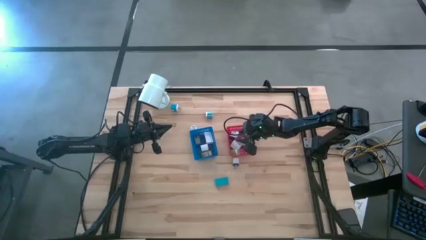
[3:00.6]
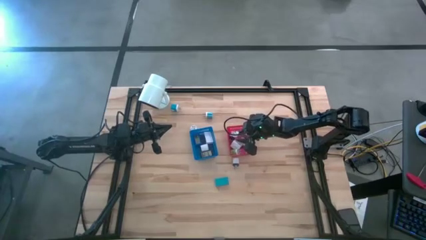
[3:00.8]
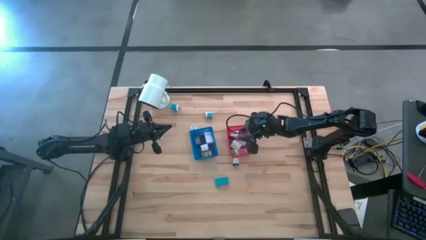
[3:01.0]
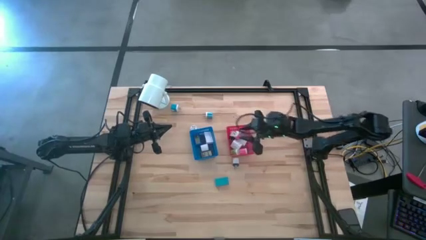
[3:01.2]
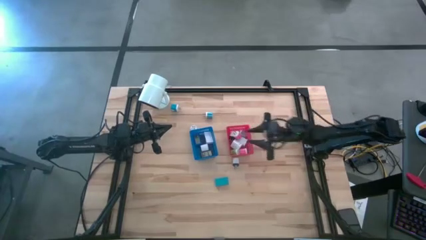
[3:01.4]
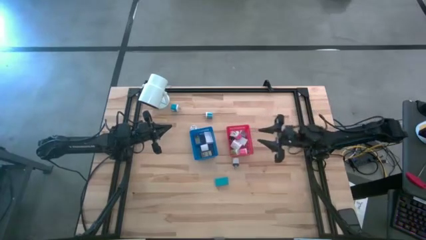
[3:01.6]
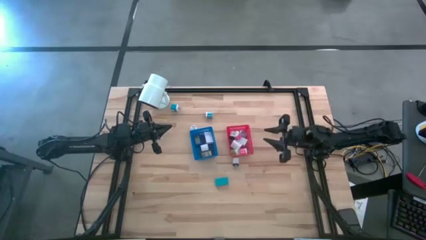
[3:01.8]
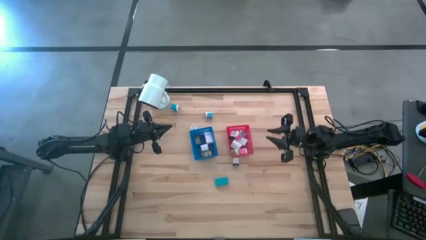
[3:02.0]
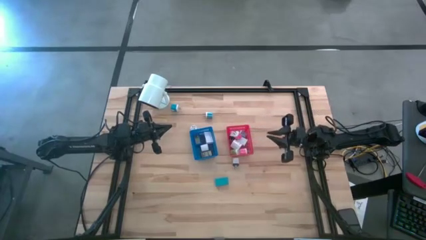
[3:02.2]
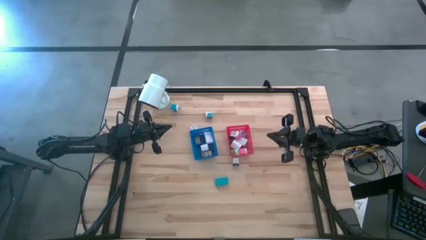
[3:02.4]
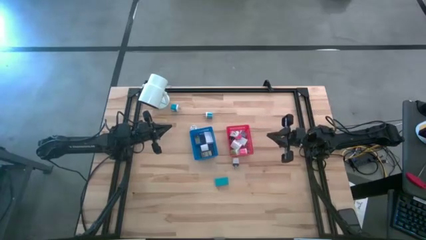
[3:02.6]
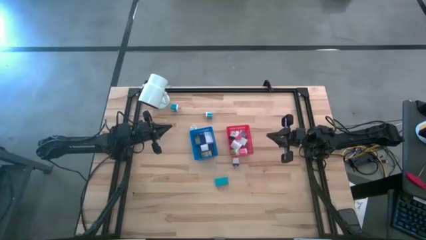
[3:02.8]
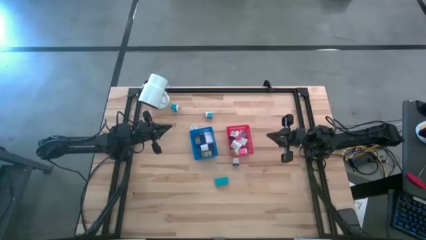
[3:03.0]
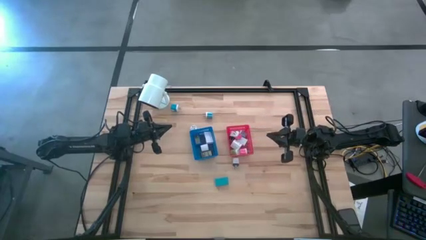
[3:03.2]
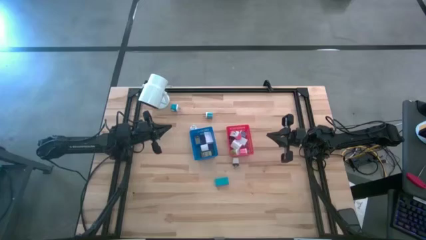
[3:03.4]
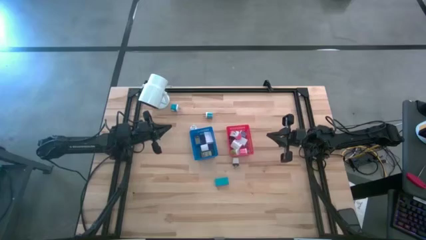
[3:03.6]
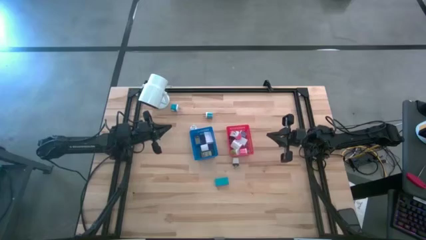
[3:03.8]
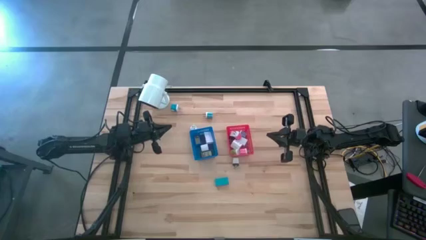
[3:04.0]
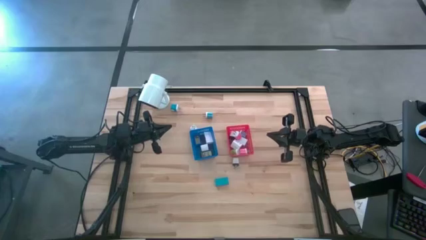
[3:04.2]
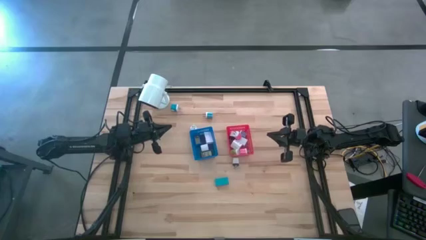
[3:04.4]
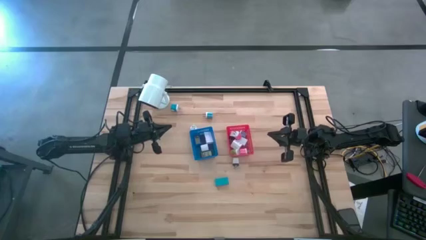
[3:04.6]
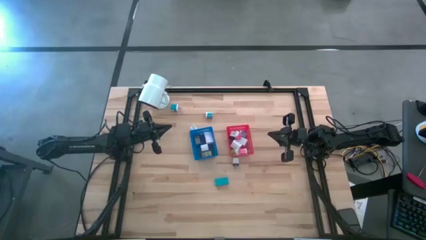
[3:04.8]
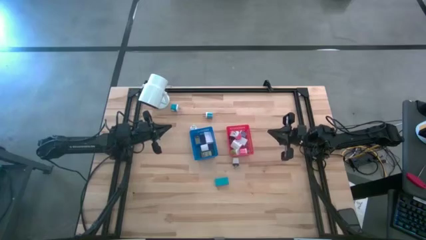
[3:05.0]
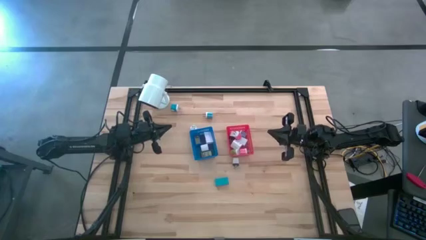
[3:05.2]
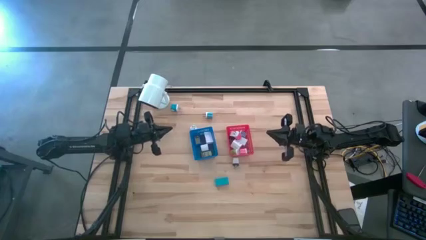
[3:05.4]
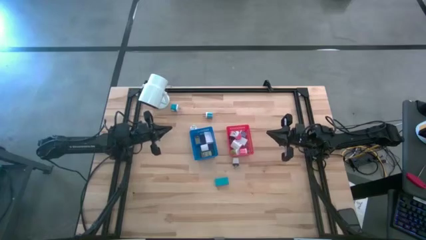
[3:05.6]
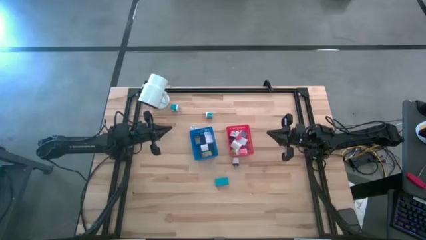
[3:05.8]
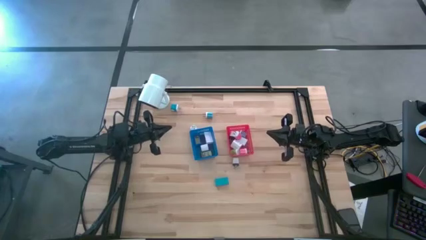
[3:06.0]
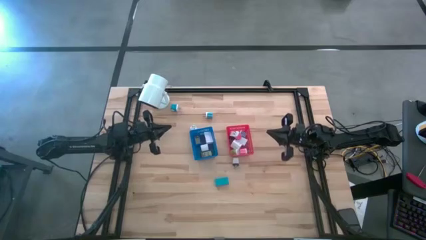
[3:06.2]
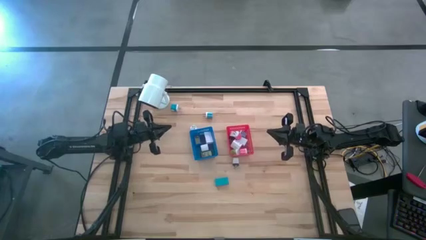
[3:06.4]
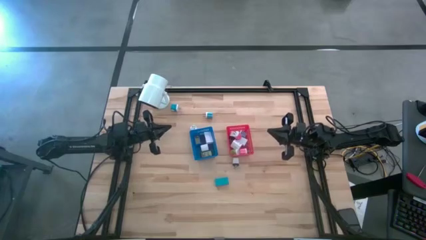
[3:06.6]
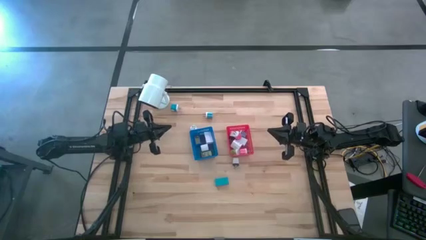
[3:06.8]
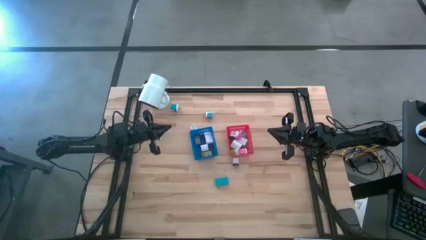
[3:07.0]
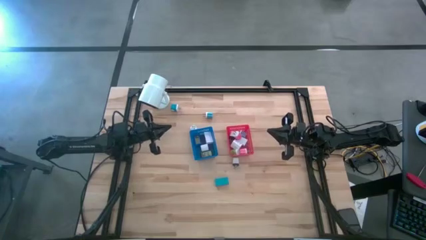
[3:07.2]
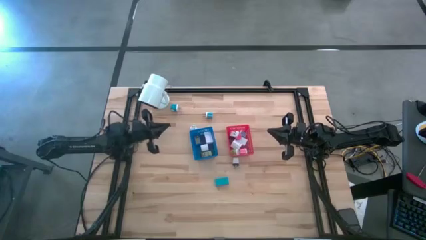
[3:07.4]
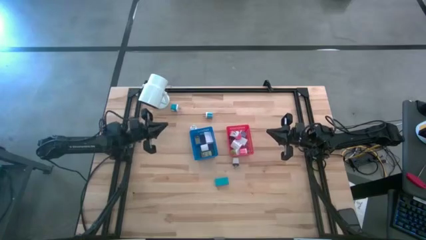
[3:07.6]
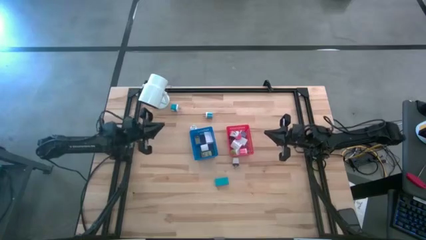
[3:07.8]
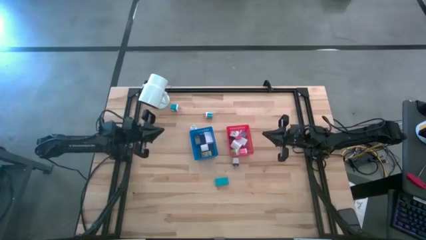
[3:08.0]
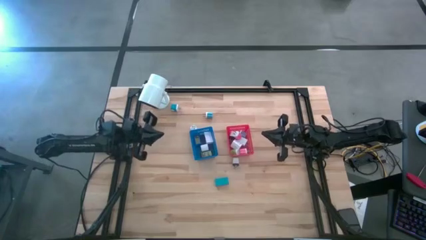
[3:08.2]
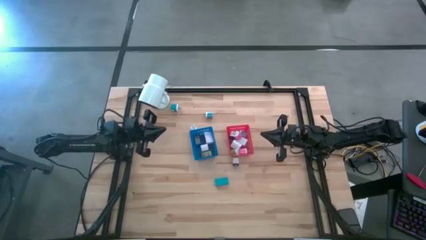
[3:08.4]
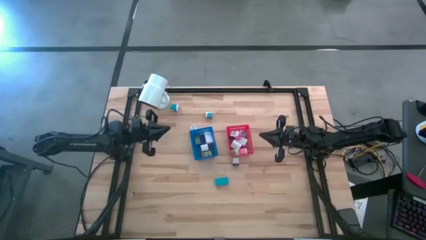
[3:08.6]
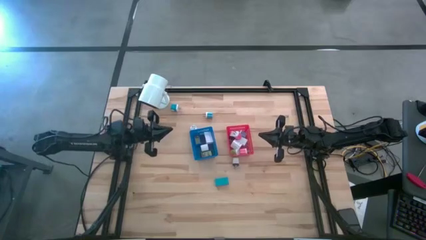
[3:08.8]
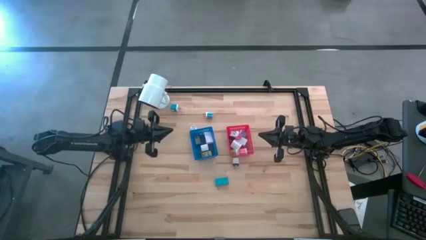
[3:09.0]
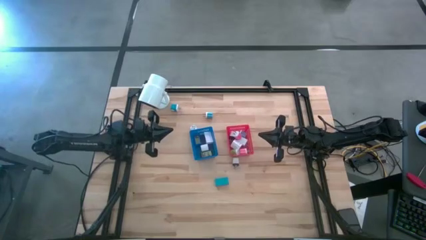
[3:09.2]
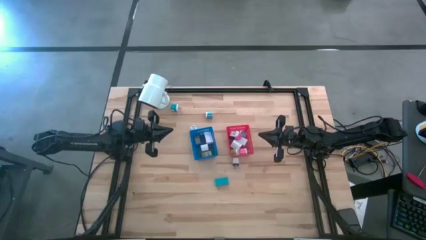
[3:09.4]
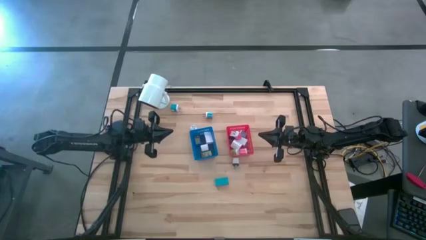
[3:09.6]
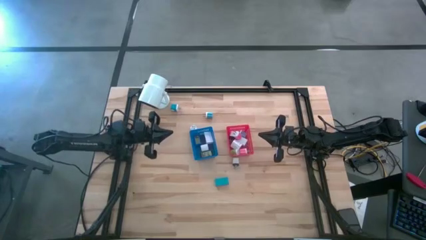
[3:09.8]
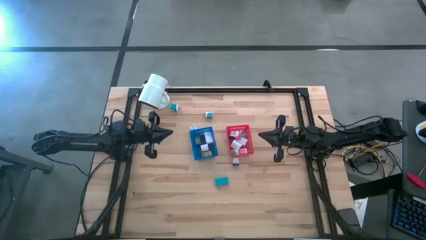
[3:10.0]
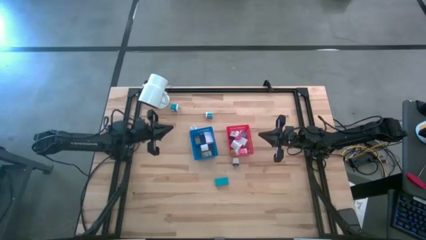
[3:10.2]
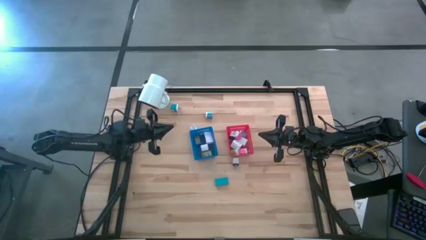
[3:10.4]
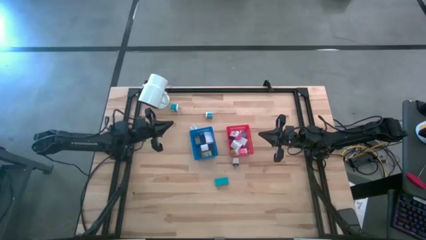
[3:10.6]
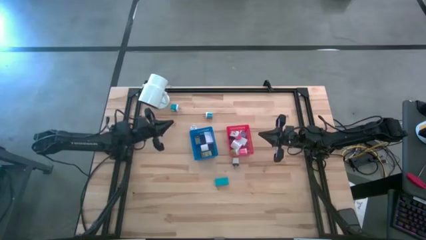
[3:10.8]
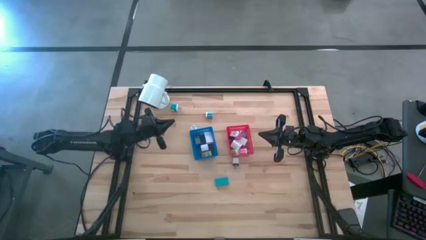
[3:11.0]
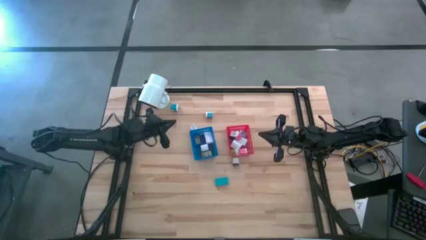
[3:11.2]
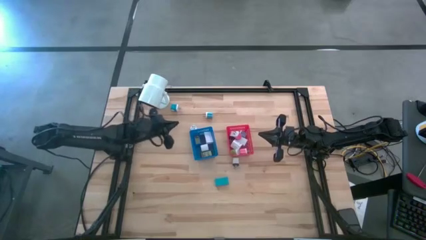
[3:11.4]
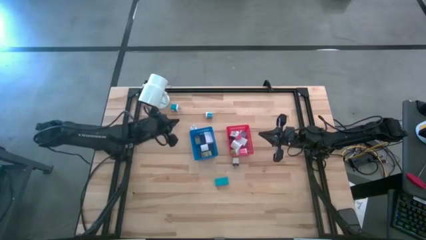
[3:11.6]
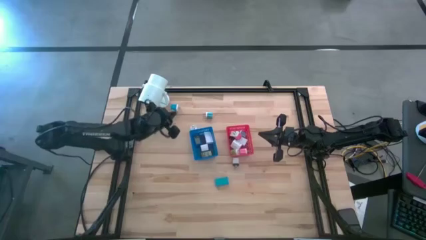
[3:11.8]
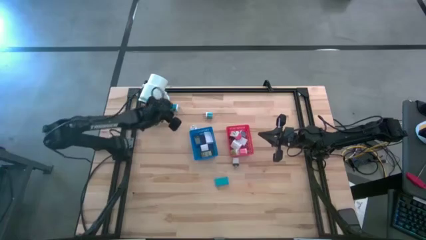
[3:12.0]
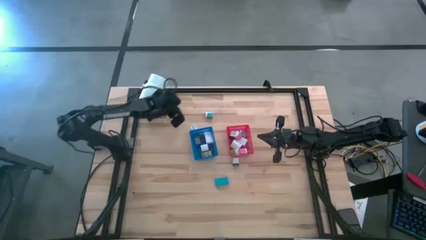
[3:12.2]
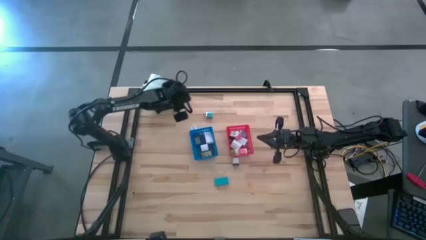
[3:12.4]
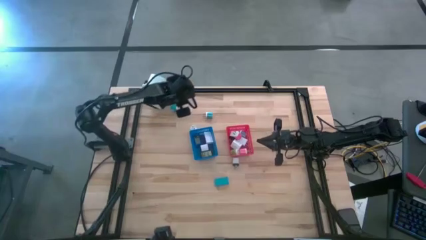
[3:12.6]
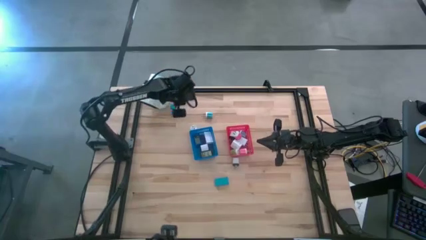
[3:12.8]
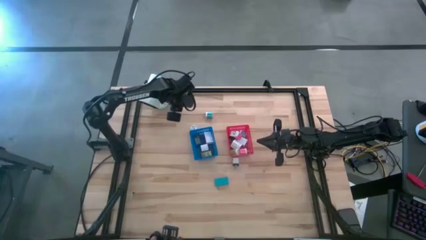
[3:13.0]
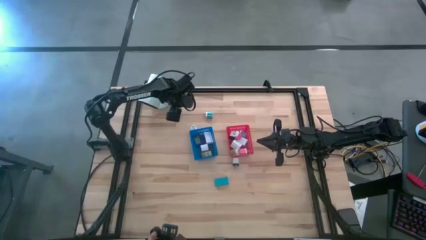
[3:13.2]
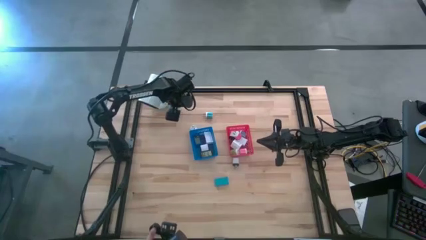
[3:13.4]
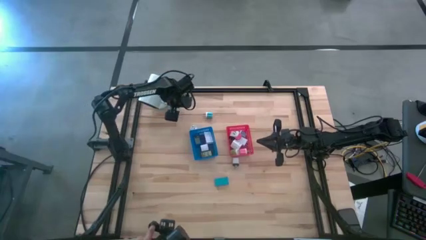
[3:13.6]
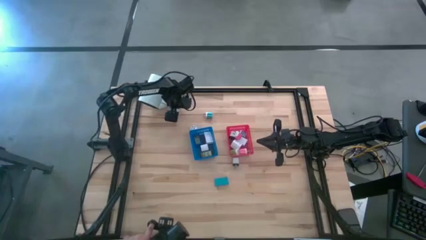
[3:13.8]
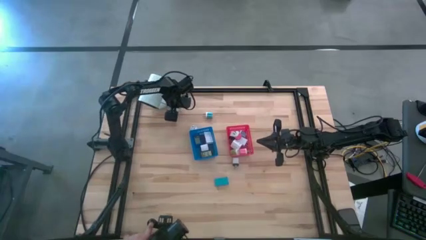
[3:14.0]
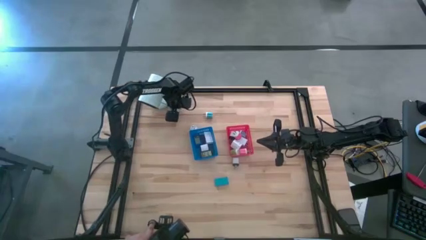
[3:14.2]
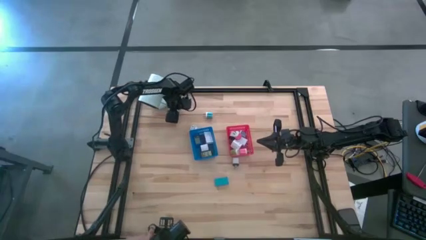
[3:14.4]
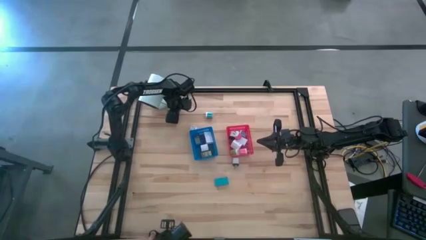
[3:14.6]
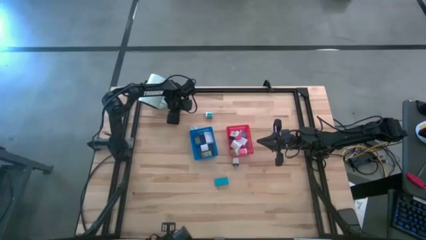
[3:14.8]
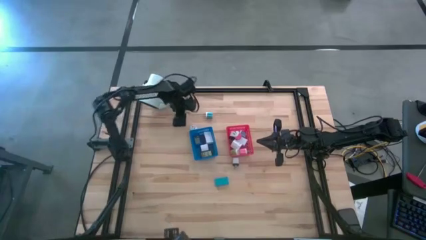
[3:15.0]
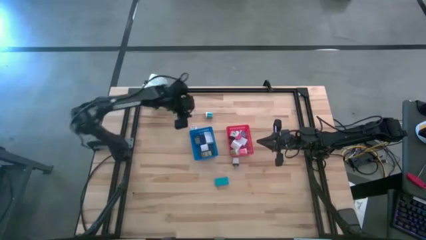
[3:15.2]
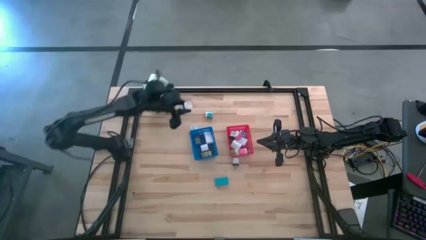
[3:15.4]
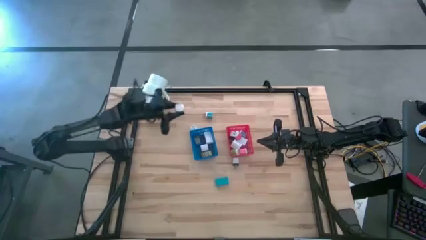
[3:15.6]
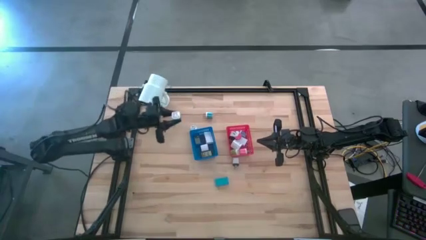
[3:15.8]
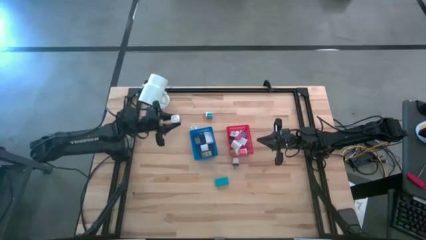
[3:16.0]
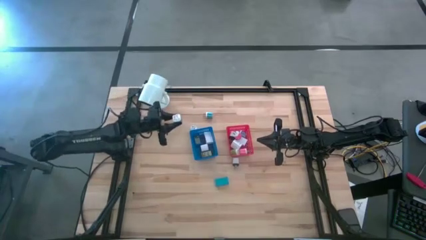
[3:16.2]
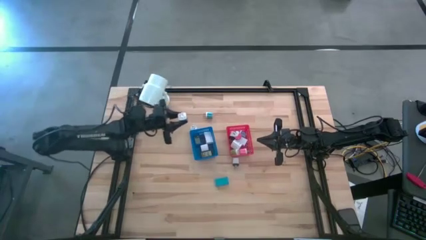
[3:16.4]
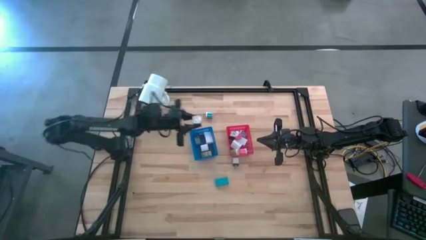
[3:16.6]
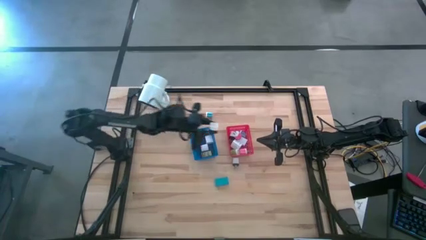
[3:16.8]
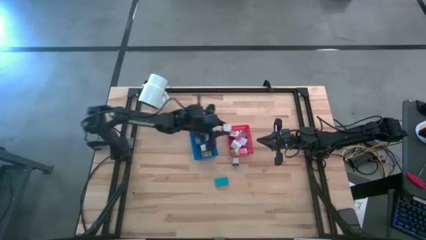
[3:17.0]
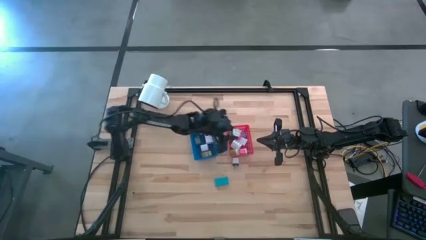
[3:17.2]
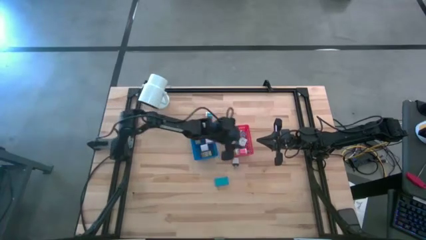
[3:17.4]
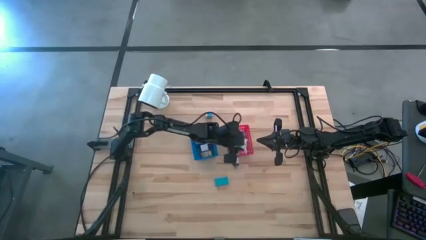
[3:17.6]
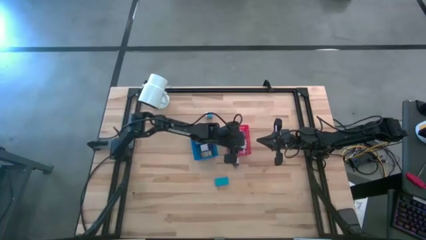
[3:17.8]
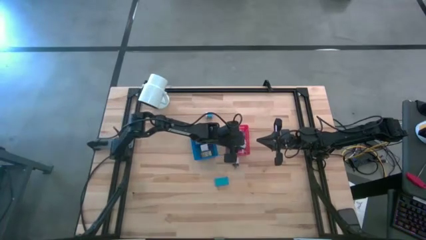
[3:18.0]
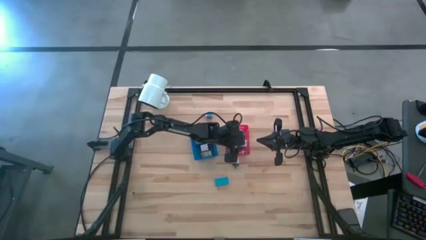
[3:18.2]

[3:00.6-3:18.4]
Task: Pick & Place Office items
Put the top light blue charger adapter into the red bin
